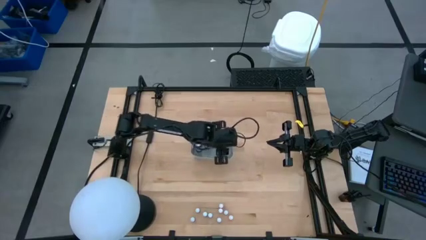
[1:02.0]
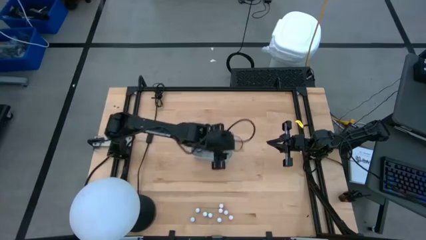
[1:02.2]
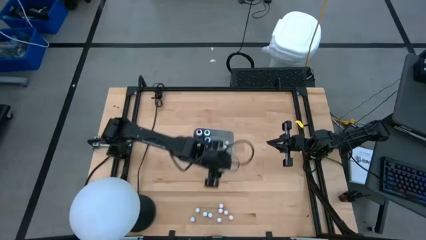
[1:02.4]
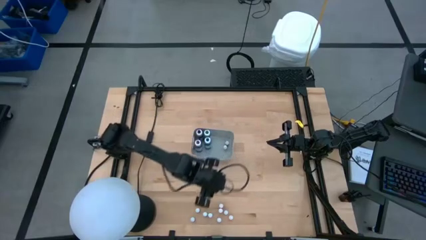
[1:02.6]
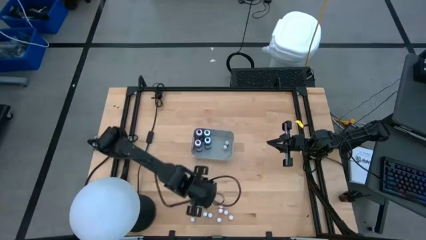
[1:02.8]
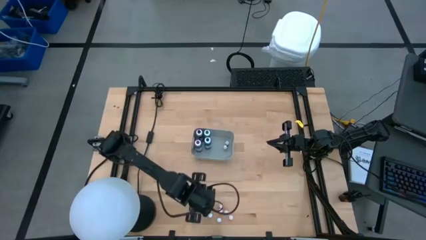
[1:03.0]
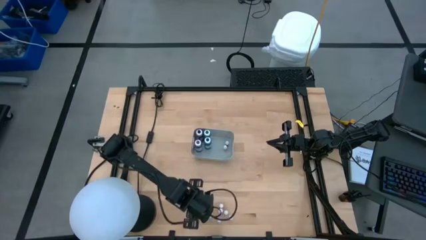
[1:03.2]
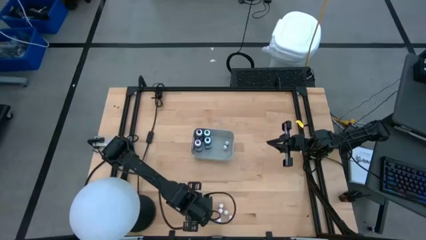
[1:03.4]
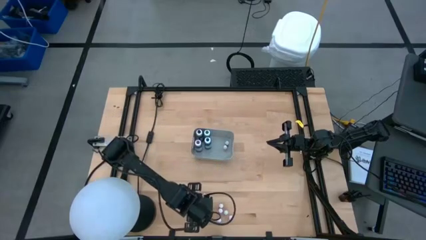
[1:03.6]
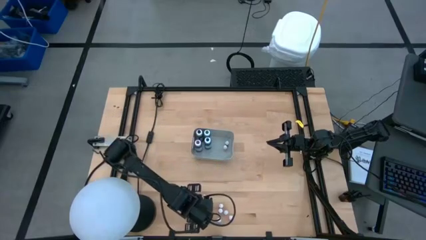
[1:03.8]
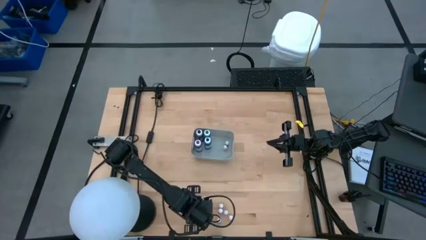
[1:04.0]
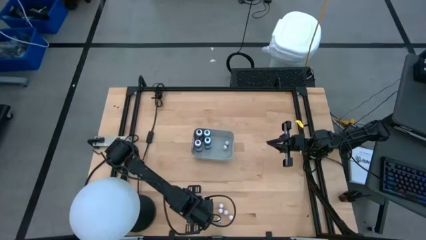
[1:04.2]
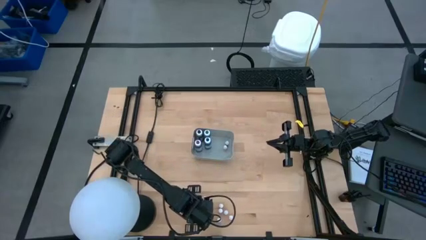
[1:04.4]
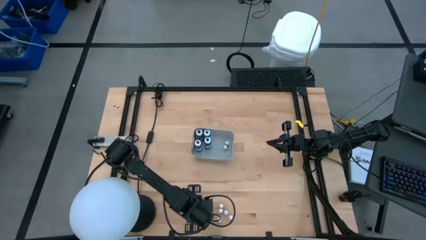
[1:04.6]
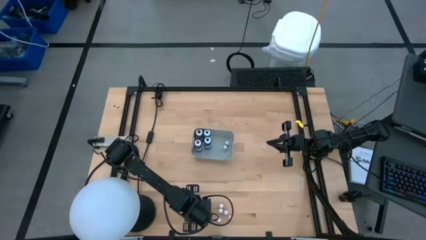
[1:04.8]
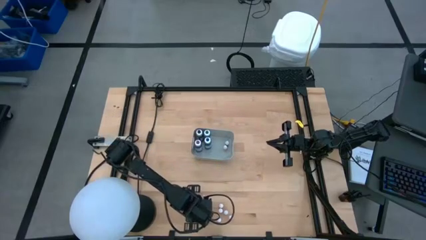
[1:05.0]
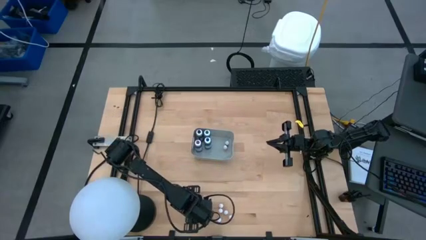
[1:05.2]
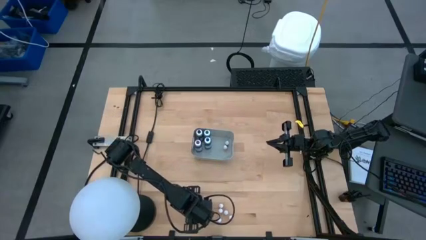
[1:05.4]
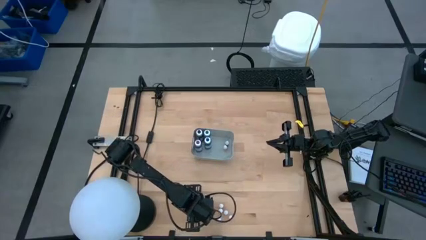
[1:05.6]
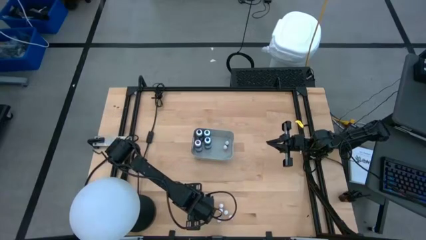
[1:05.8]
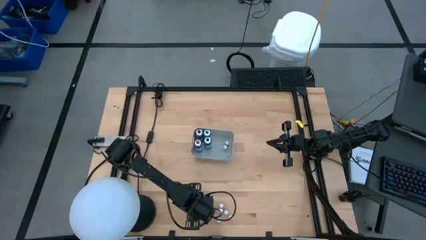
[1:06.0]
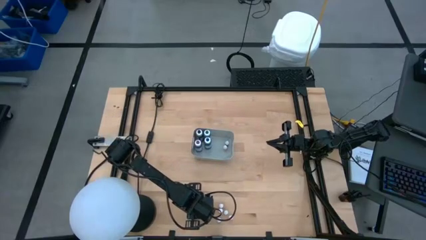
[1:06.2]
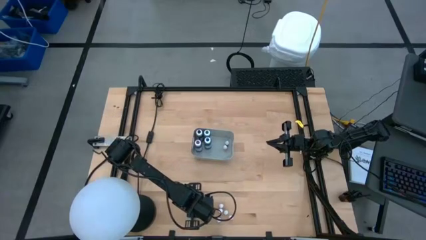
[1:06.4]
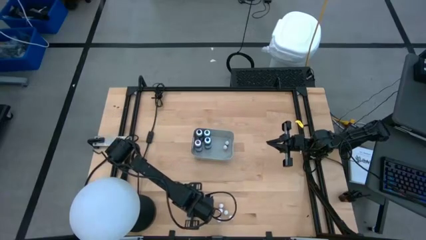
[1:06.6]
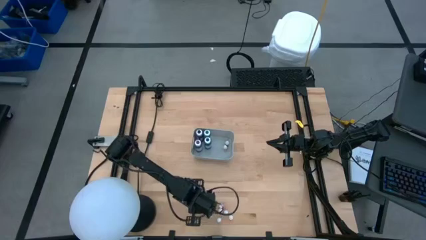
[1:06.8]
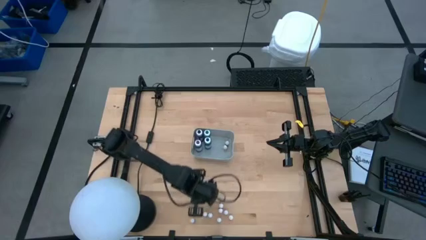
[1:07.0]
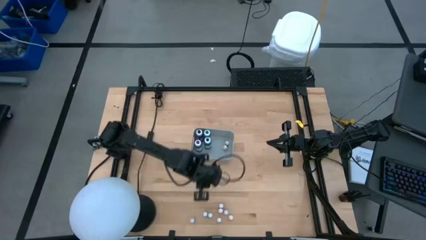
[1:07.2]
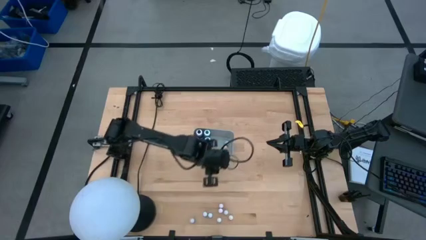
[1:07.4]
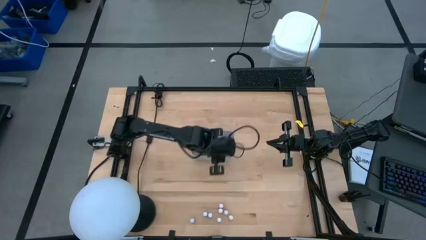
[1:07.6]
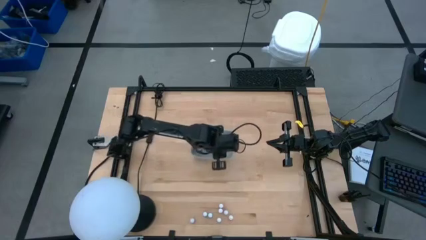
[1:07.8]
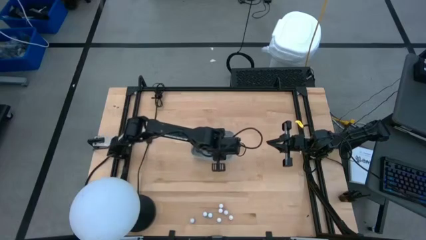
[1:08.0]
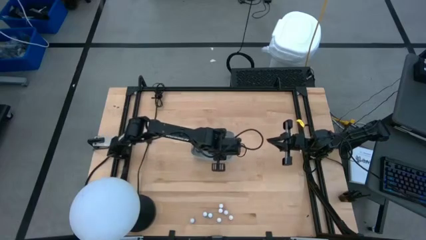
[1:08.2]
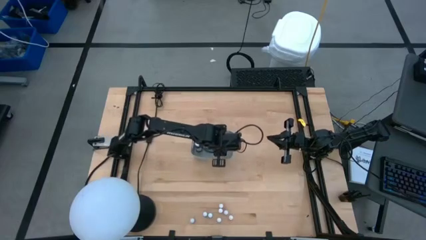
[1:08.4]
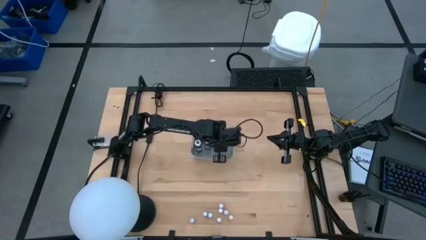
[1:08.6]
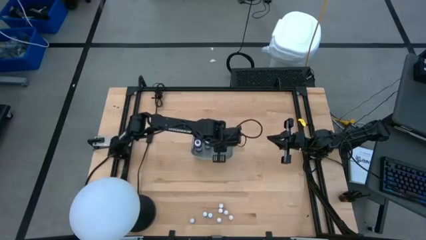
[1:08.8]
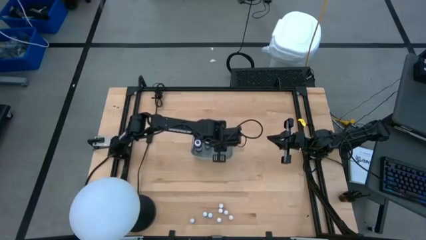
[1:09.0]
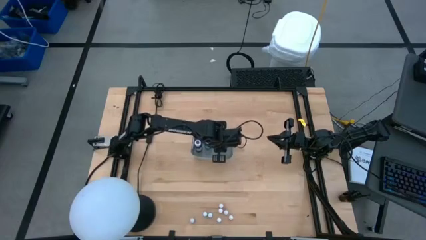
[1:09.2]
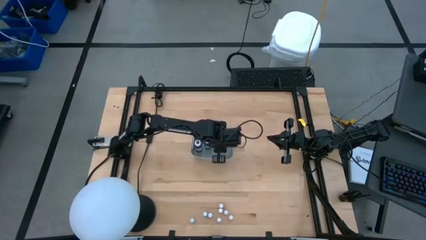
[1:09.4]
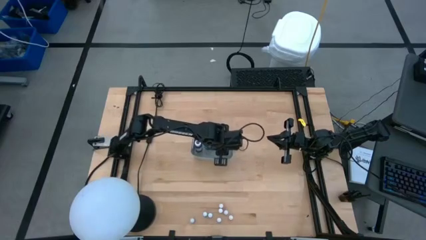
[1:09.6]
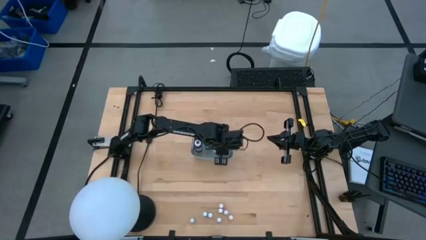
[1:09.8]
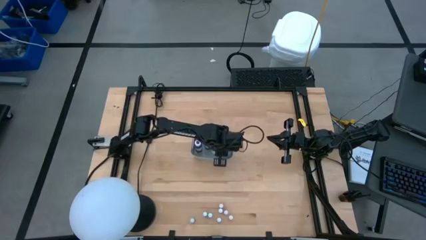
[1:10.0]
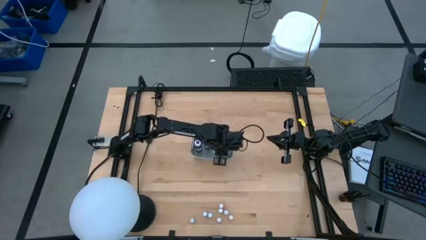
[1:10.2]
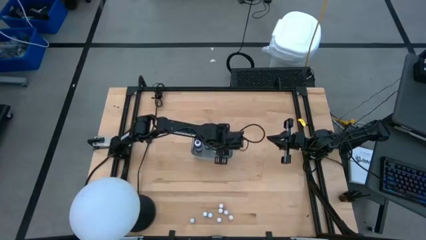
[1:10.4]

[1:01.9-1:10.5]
Task: Pick & Place food coloring
Put the small black food coloring bottle into the gray bin

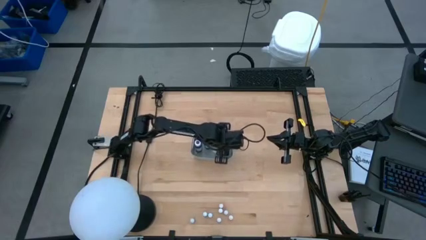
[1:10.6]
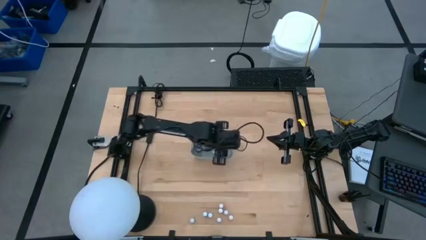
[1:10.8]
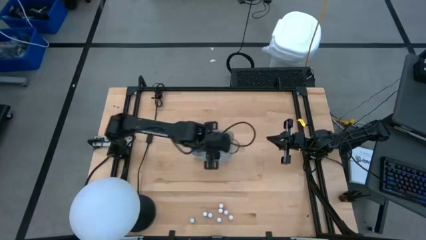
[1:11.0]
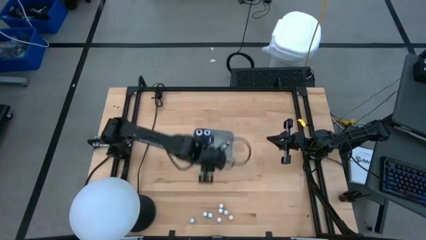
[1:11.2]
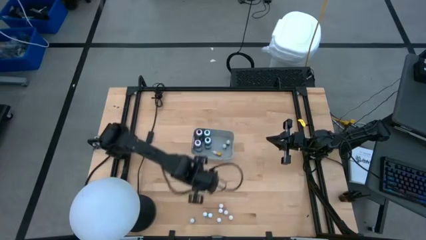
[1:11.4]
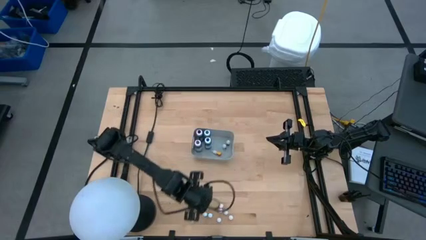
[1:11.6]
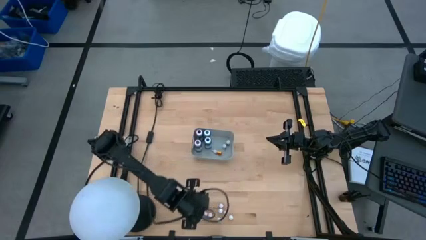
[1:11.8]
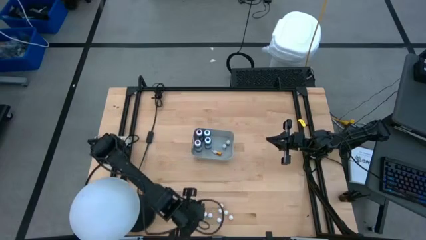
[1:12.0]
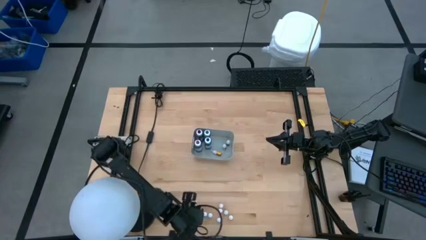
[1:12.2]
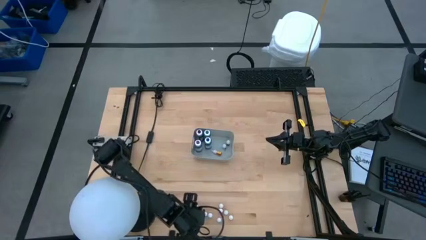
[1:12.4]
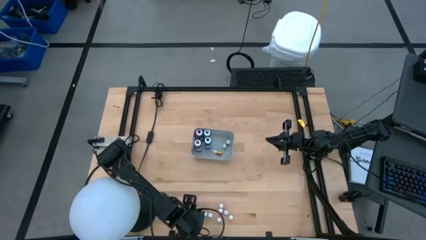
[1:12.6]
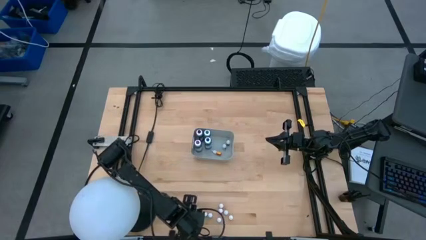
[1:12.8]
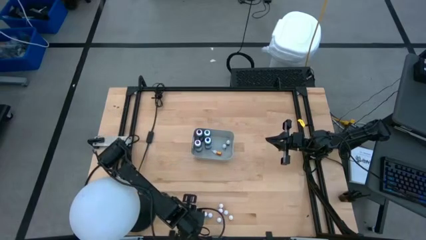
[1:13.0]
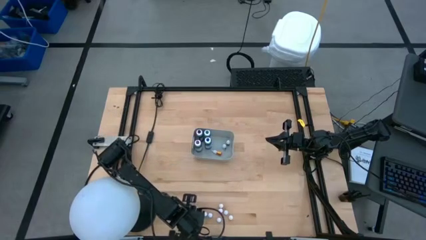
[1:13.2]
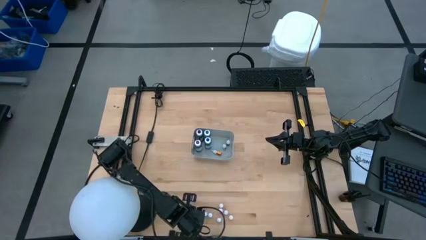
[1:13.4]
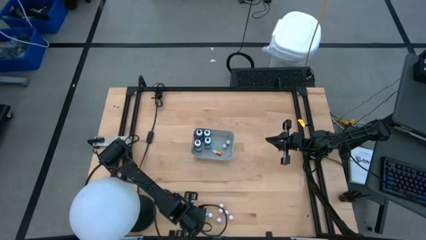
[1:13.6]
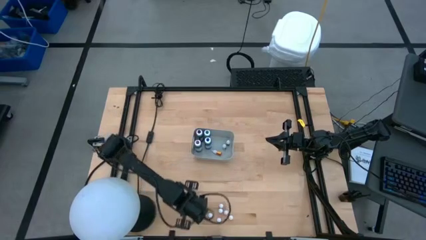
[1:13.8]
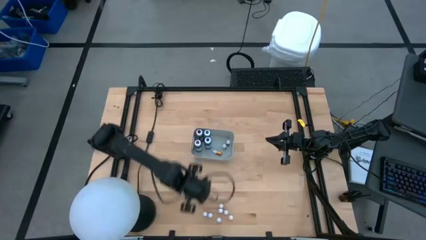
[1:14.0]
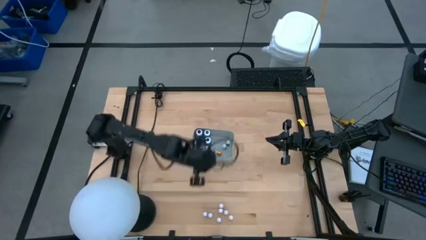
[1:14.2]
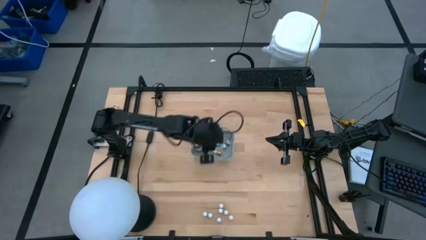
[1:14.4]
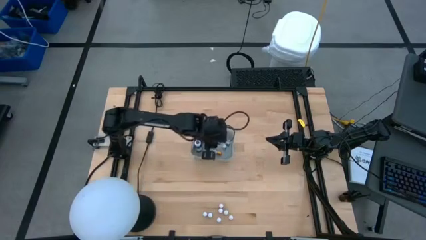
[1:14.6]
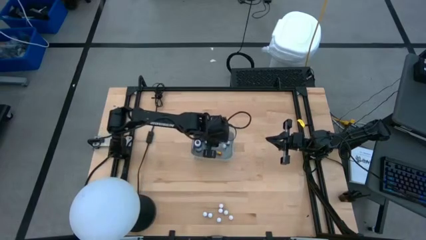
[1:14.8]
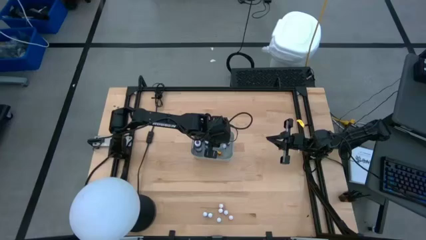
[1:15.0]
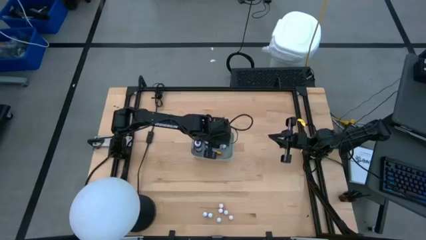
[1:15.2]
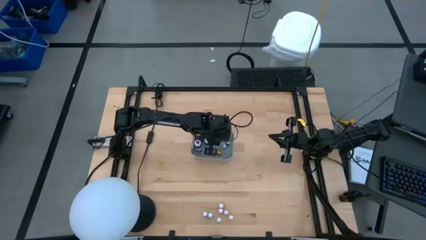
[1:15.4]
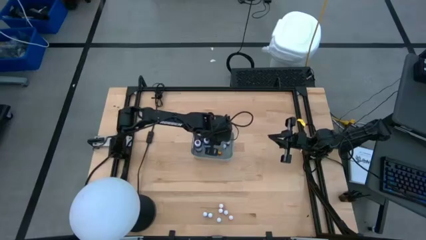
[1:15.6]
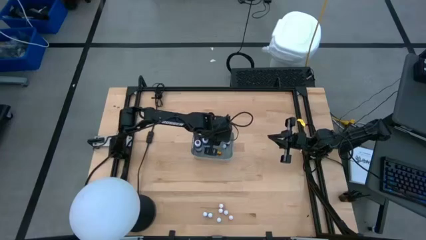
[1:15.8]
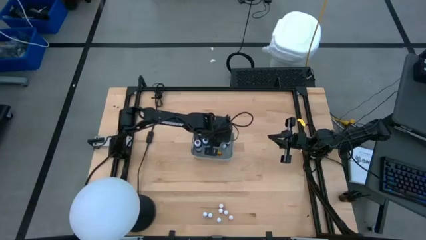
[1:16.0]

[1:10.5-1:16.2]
Put the small black food coloring bottle into the gray bin

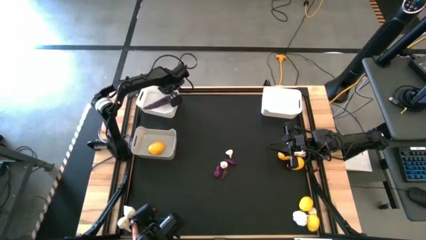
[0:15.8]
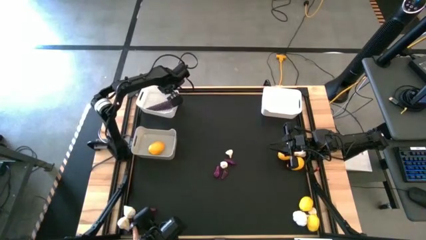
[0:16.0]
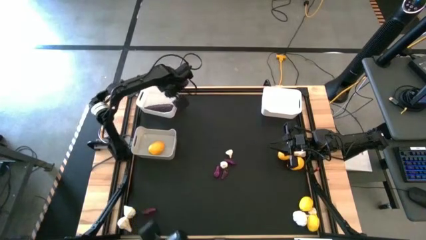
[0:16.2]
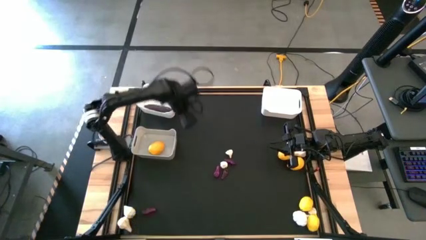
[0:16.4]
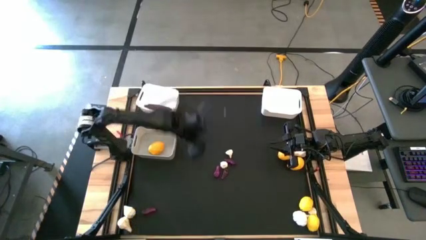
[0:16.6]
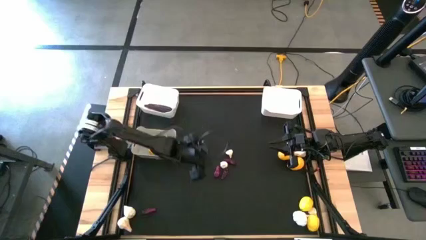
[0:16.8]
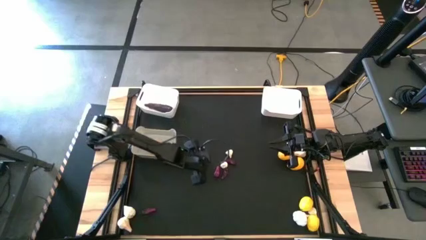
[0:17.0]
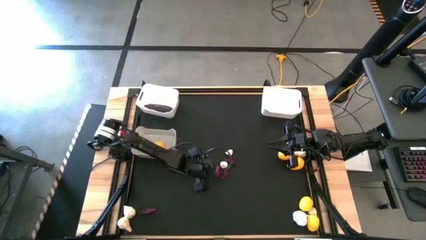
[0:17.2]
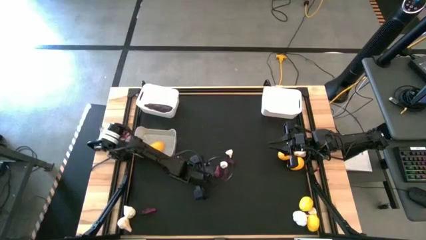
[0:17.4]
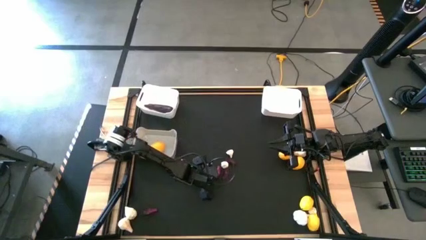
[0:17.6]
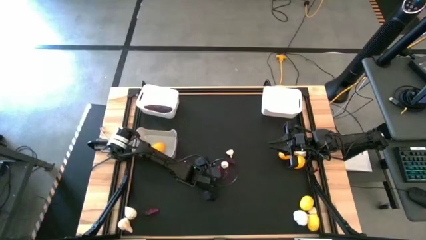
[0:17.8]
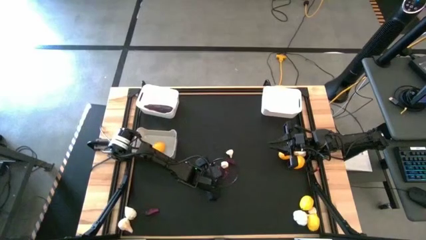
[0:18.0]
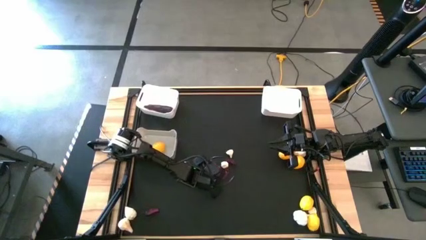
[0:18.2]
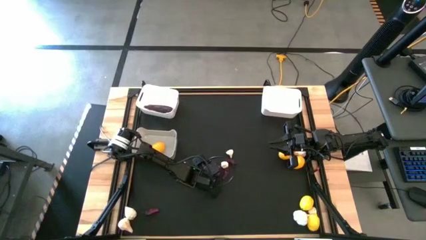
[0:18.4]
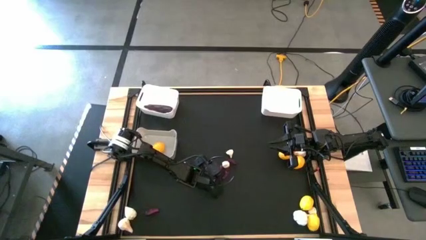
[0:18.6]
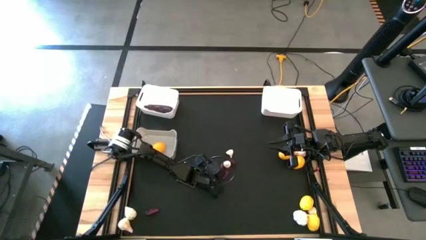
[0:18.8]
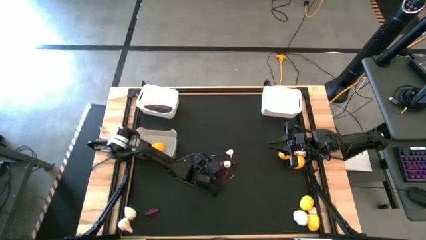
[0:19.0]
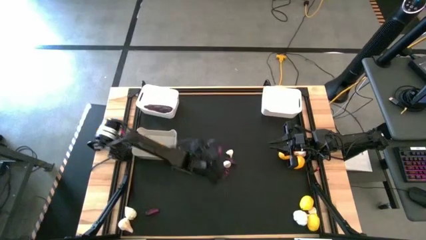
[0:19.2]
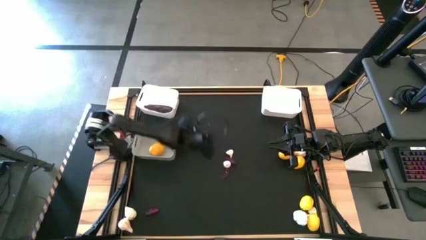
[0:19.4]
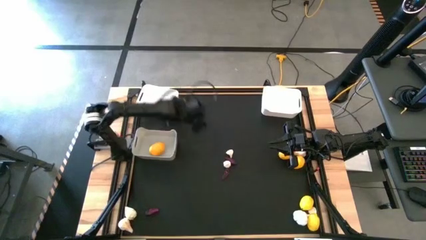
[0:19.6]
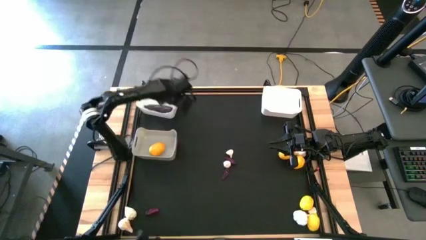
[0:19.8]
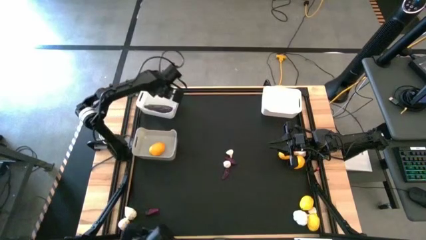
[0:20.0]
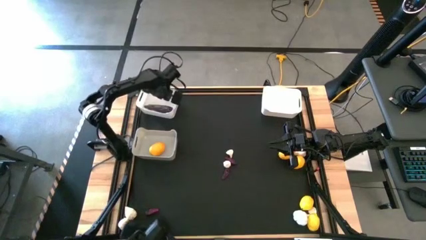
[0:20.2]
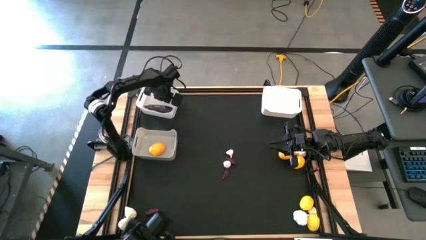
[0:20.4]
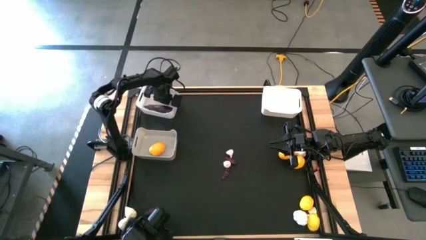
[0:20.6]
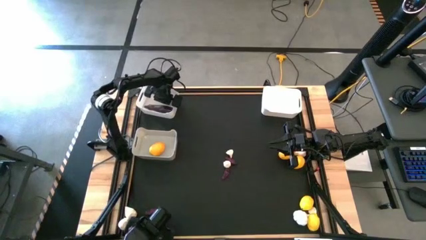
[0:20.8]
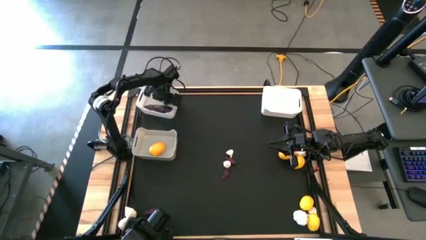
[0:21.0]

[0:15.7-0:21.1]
Task: Sort produce into baskets
Put the eggplant into the left white bin
